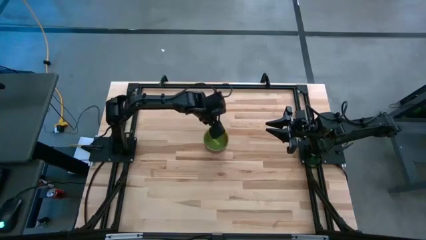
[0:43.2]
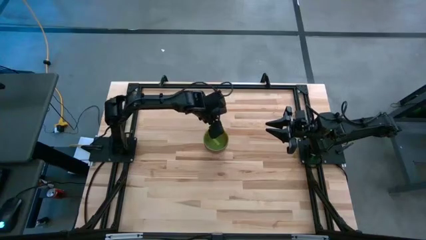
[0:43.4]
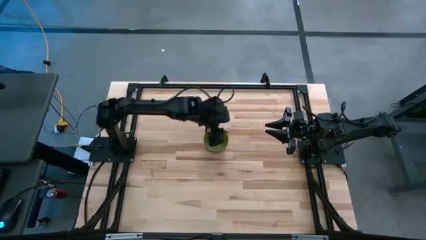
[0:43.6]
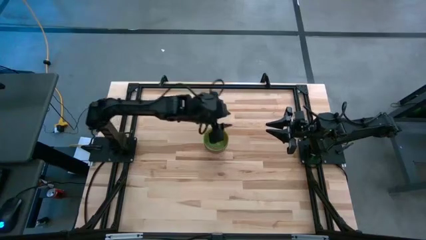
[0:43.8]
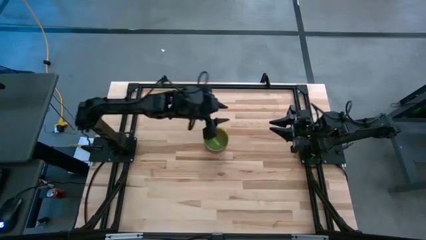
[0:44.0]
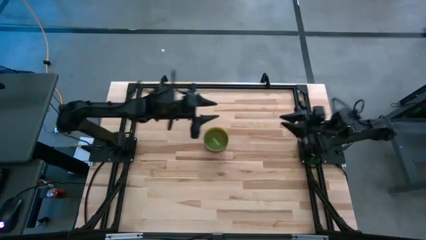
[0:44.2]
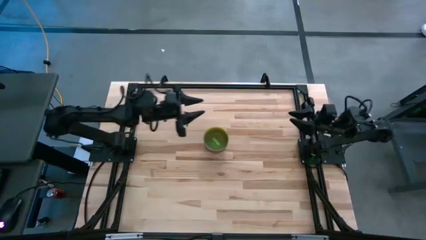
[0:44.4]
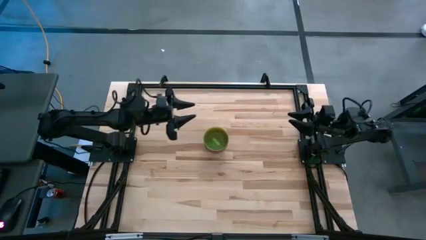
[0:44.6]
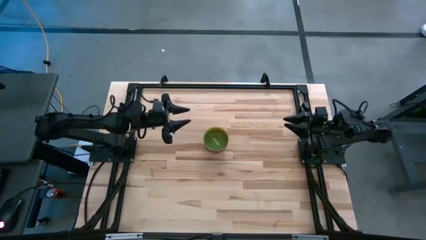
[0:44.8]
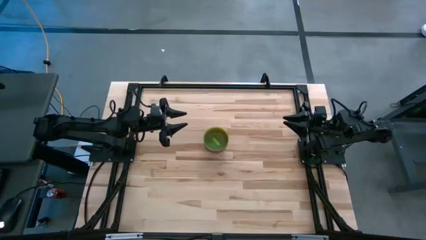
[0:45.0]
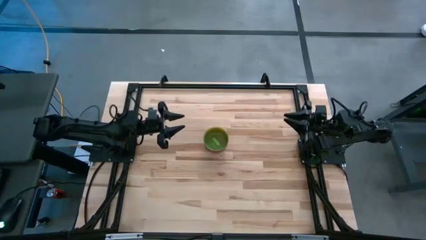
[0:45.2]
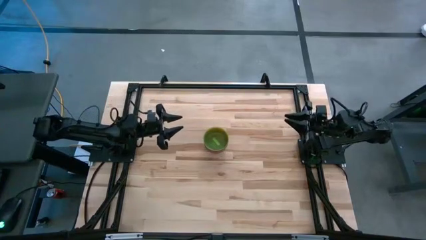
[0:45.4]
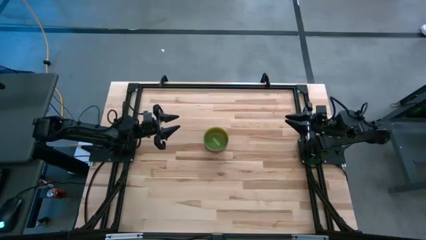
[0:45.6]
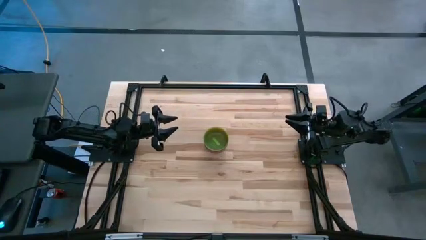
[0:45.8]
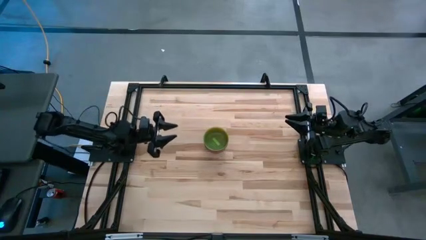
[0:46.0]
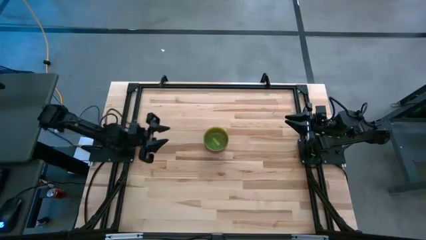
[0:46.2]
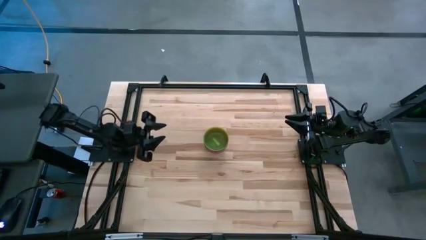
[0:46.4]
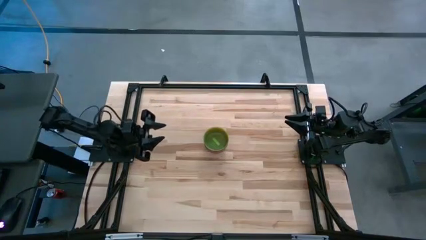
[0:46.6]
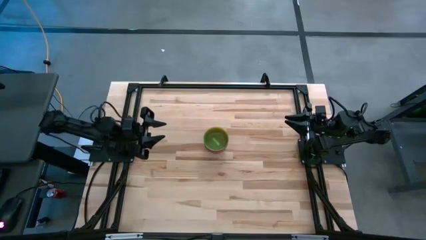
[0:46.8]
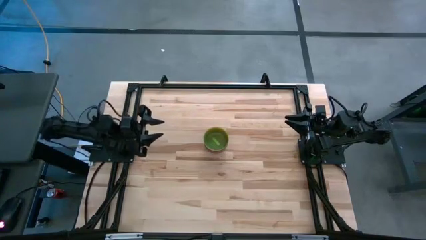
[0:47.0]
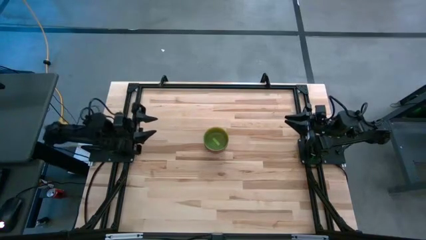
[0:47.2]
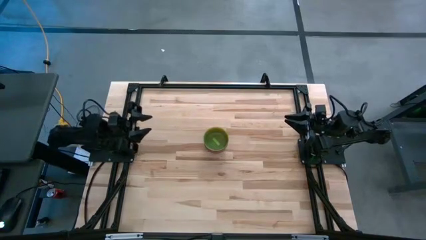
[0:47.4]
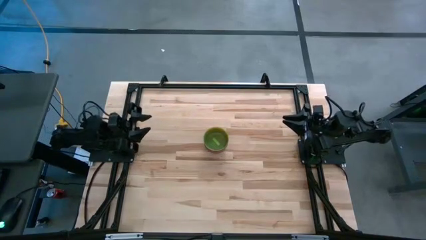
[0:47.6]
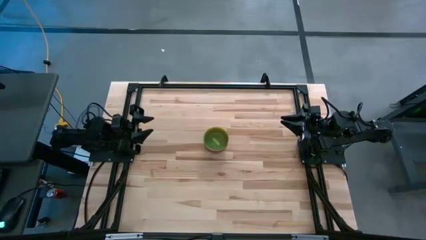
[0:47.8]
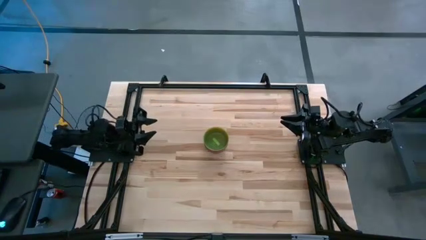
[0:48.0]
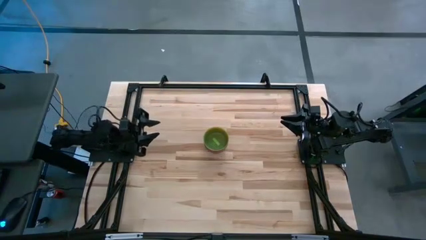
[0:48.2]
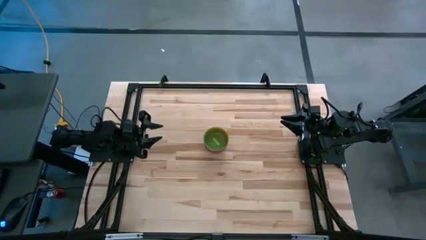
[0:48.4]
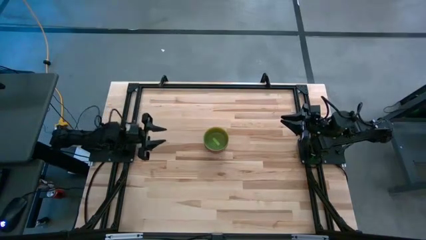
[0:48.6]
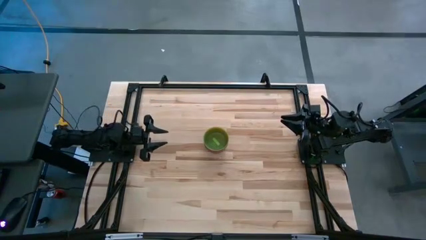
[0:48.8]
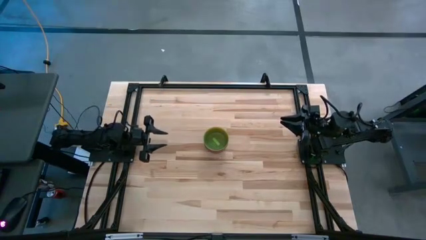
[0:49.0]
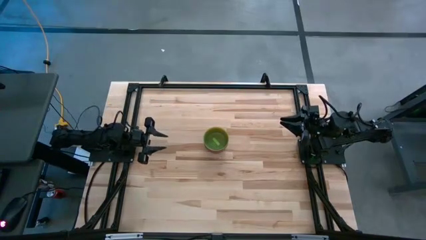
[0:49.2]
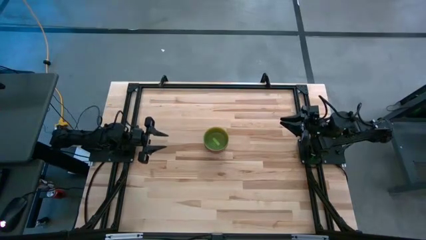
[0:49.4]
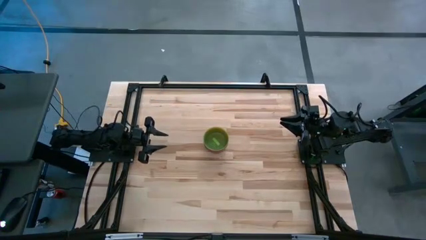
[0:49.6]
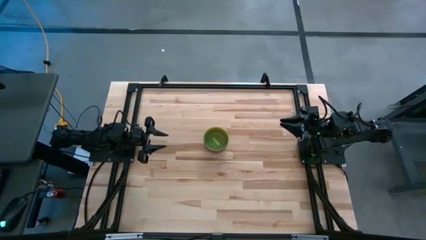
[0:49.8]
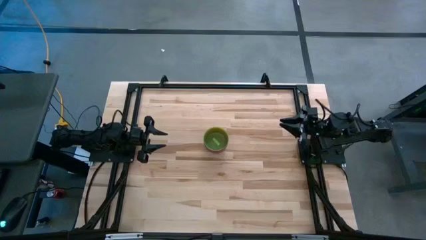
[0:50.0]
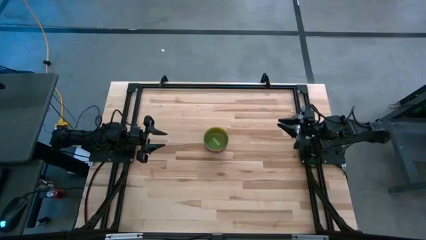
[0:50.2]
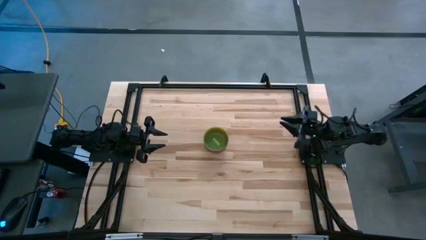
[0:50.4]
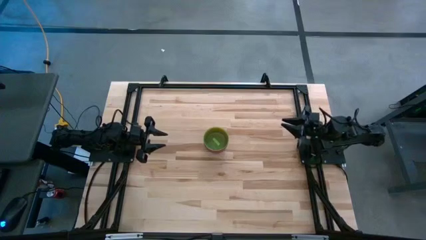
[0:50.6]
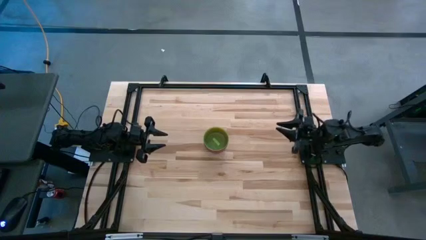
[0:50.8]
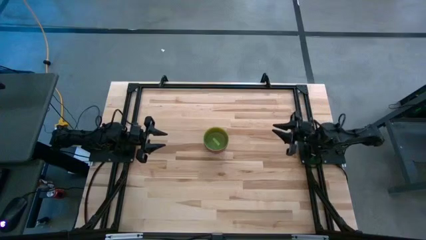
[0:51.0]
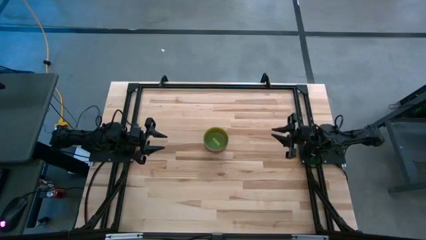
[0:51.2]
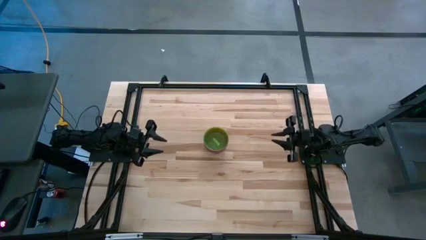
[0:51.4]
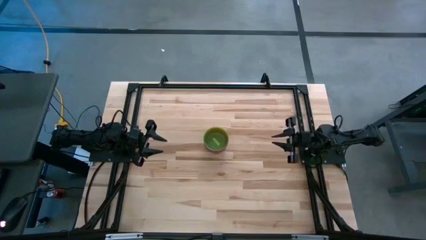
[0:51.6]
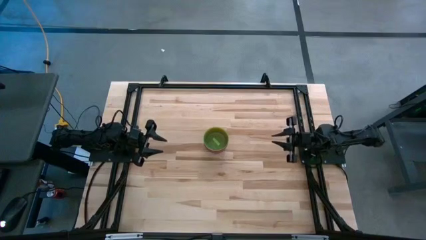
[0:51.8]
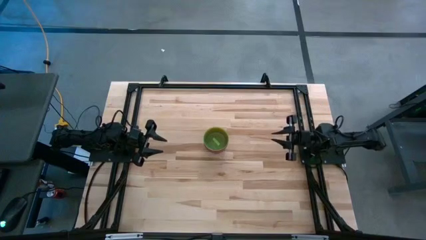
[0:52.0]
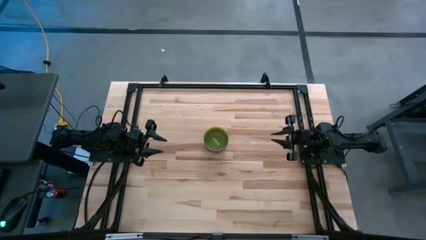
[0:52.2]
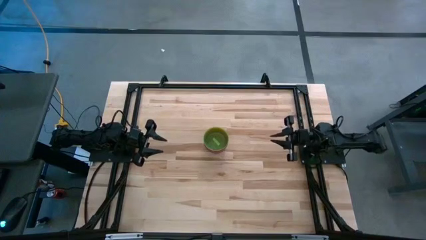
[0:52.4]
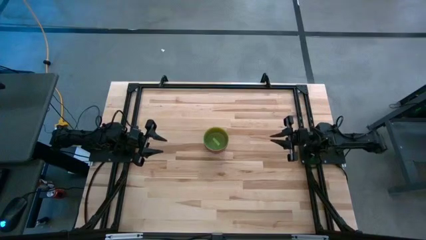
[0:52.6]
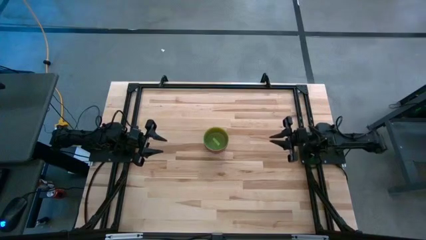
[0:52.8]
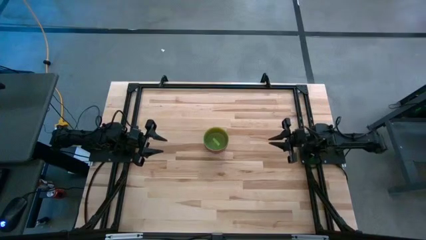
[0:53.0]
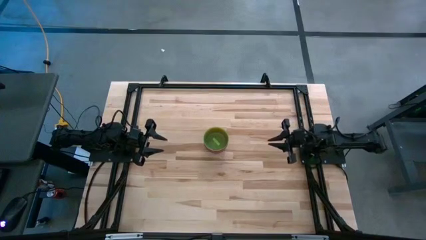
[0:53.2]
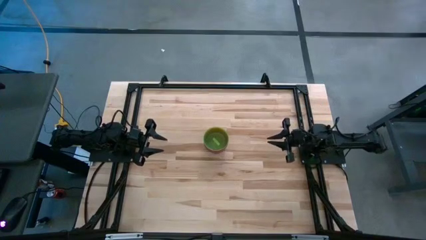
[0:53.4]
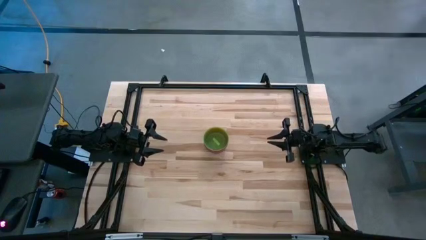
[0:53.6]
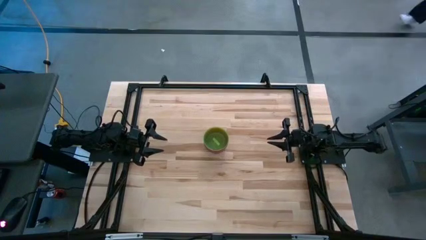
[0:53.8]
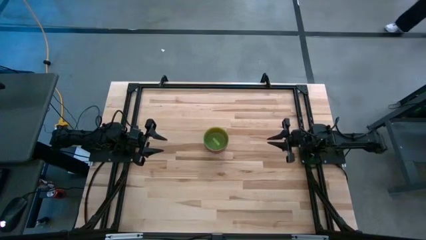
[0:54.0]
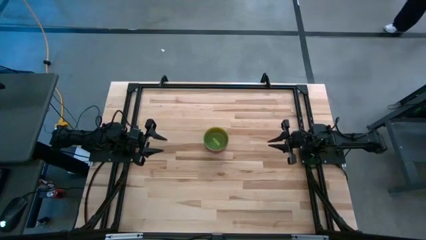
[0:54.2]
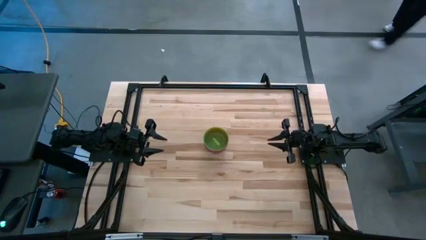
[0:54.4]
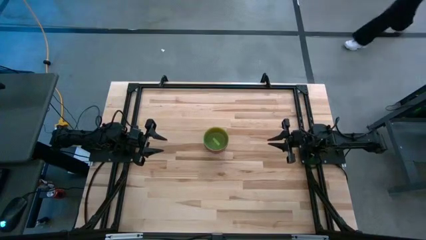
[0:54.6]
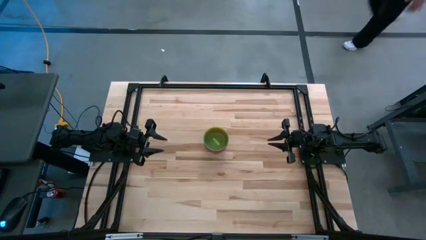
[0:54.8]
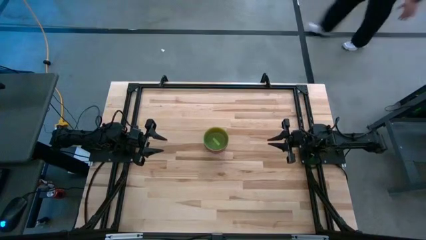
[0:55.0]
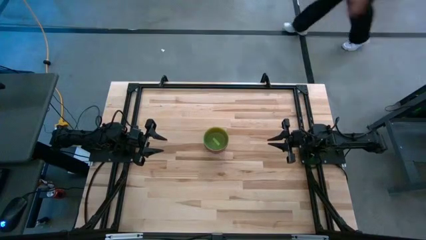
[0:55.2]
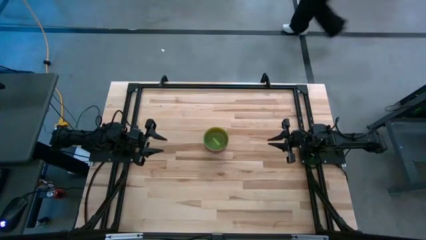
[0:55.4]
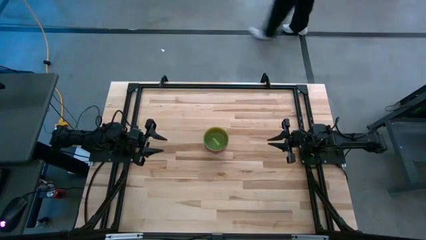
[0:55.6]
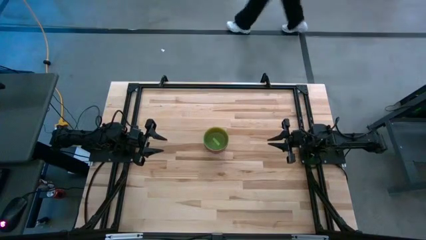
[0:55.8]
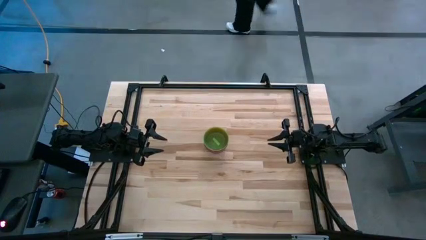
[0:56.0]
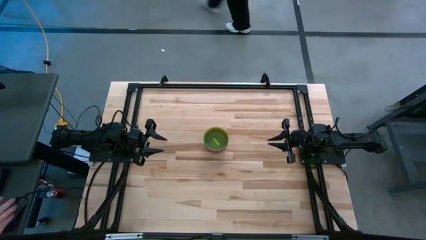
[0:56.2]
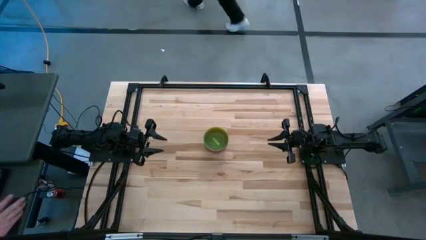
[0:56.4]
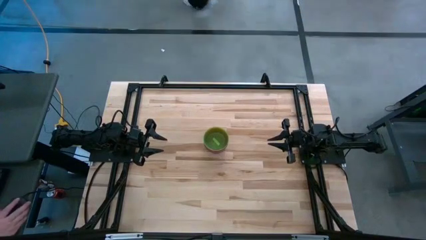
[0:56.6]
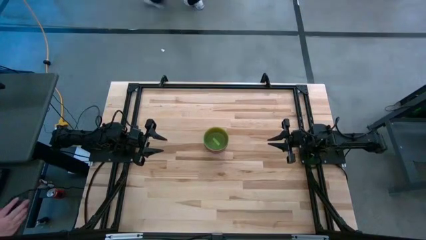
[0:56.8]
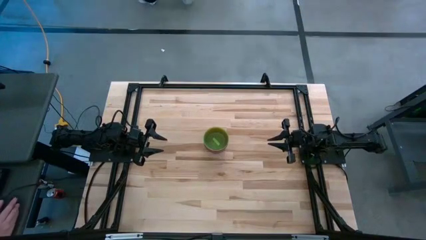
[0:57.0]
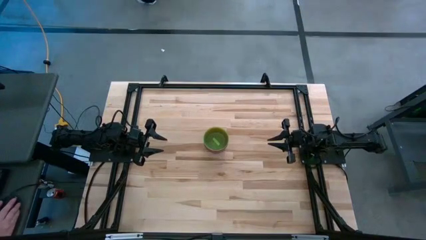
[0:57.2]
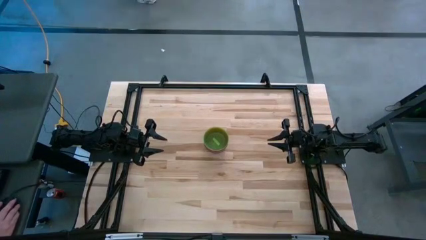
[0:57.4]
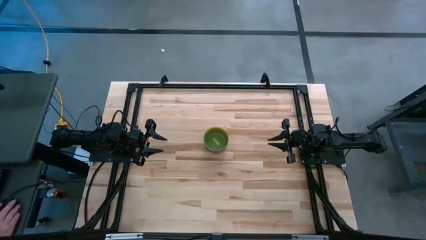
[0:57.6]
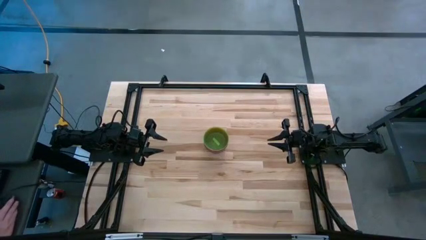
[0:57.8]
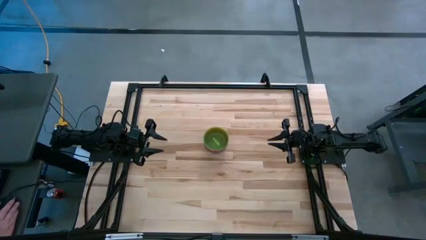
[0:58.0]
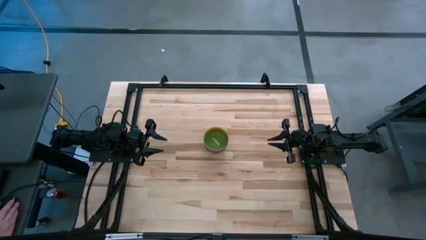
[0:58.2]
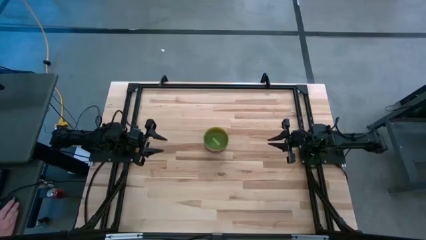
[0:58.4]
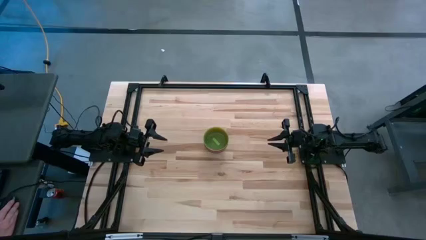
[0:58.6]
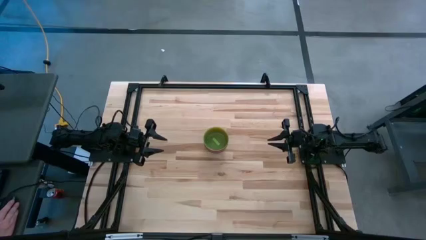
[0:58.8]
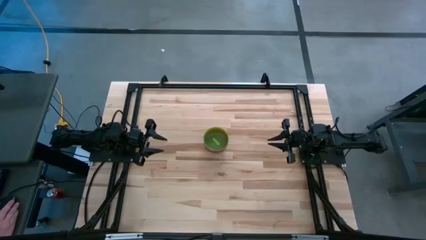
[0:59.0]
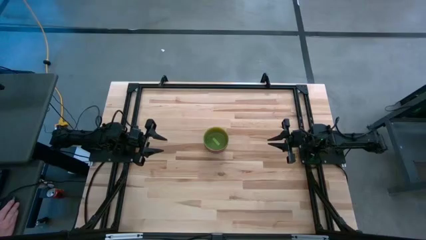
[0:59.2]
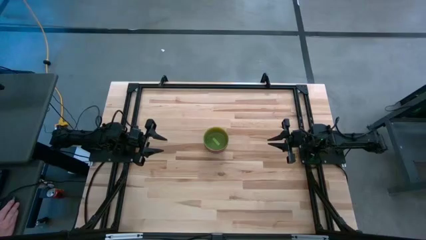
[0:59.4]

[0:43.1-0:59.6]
Task: Nest bowls inside each other
Return to Home Position
